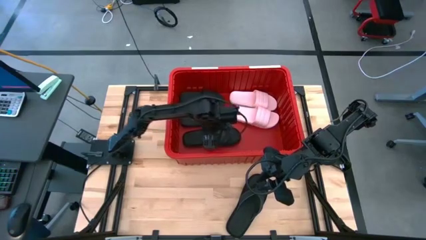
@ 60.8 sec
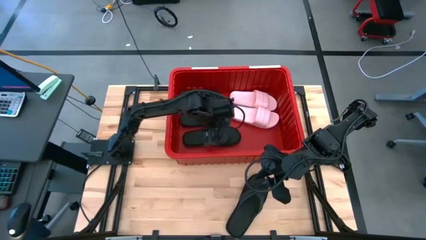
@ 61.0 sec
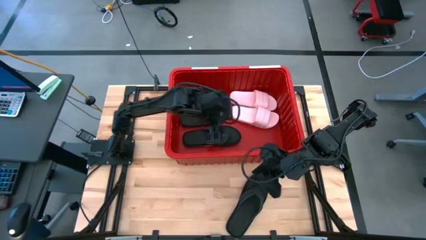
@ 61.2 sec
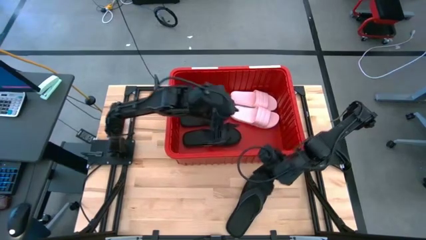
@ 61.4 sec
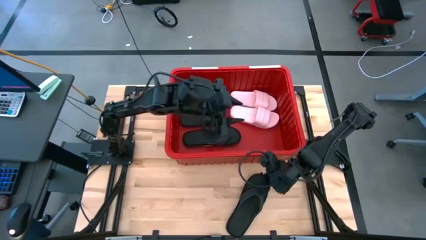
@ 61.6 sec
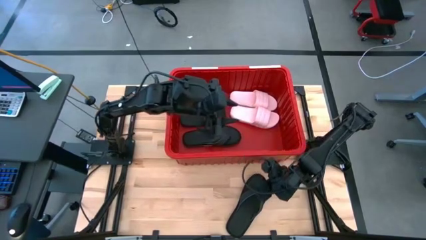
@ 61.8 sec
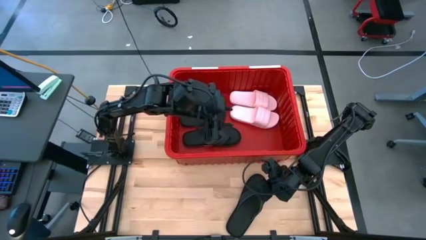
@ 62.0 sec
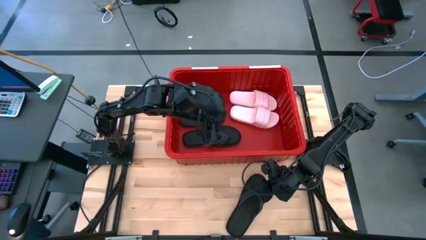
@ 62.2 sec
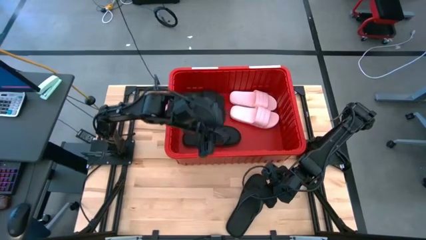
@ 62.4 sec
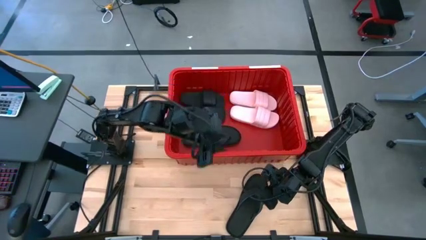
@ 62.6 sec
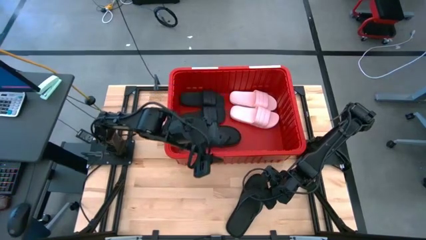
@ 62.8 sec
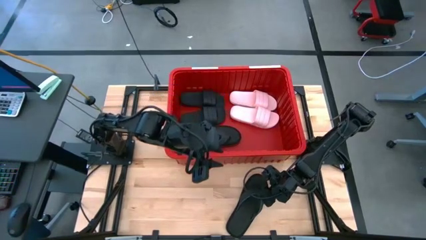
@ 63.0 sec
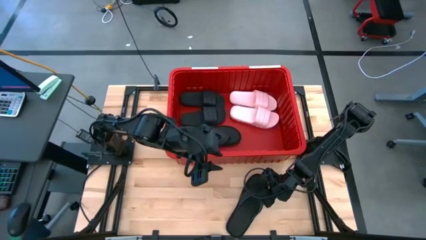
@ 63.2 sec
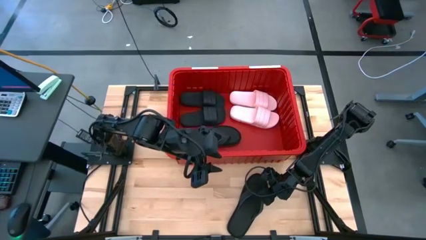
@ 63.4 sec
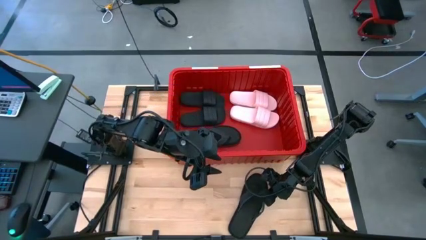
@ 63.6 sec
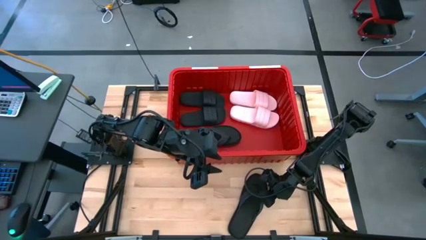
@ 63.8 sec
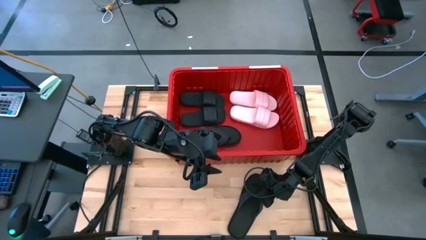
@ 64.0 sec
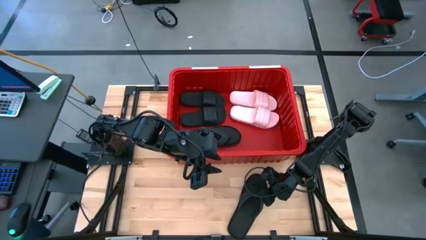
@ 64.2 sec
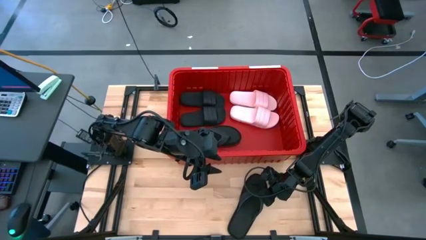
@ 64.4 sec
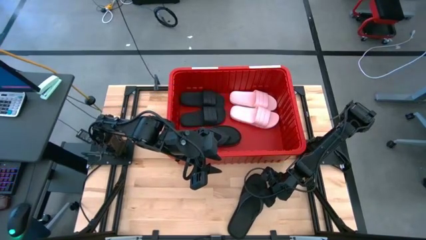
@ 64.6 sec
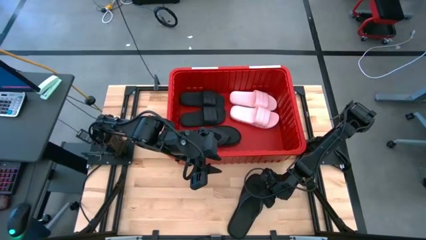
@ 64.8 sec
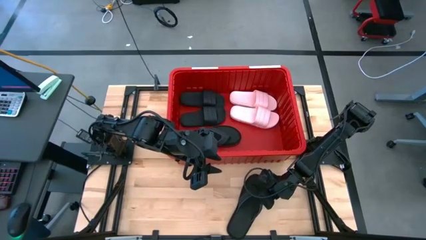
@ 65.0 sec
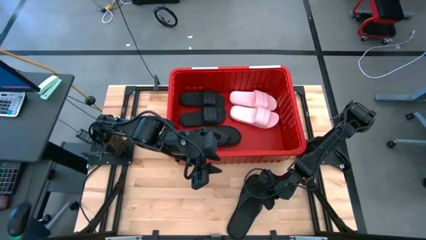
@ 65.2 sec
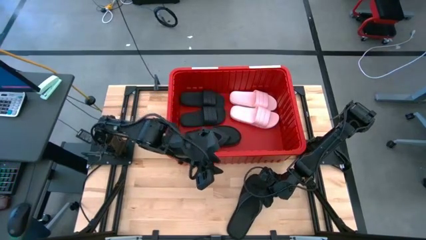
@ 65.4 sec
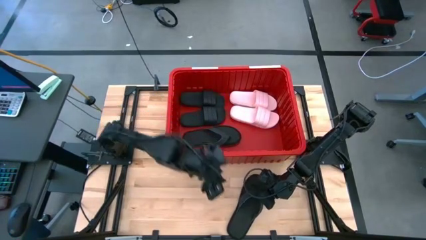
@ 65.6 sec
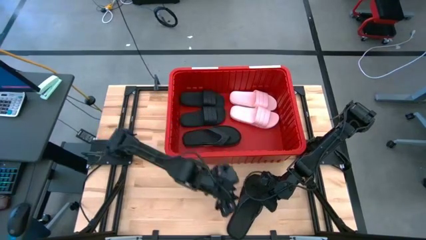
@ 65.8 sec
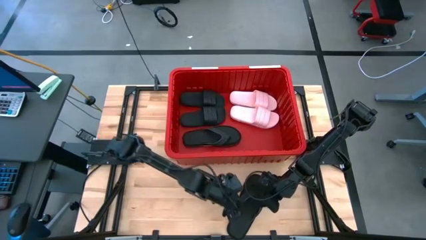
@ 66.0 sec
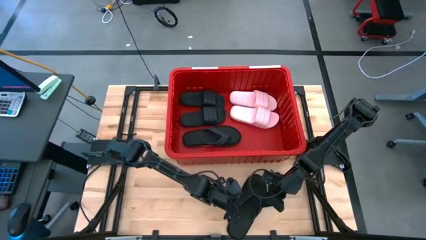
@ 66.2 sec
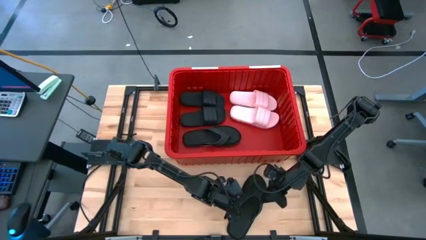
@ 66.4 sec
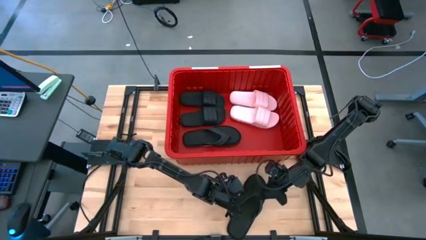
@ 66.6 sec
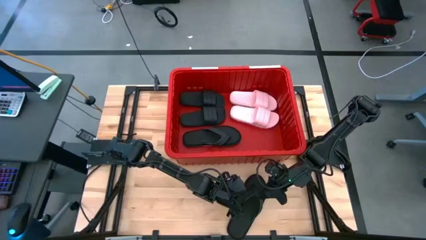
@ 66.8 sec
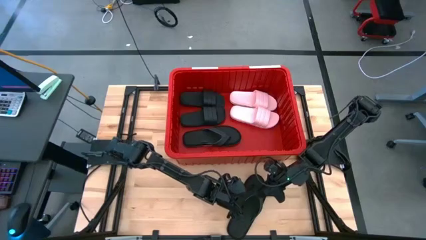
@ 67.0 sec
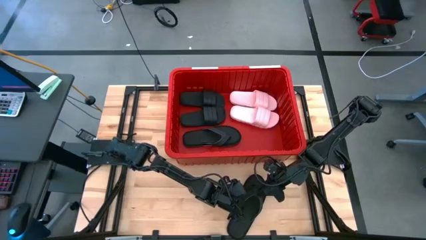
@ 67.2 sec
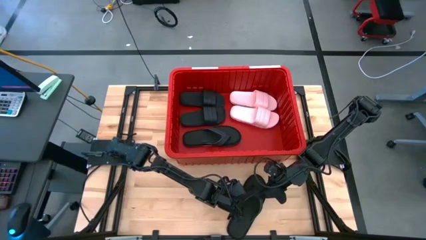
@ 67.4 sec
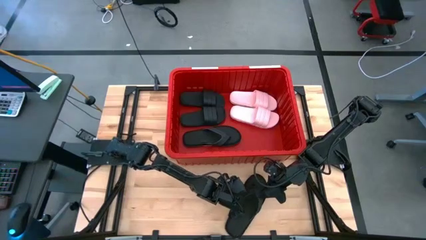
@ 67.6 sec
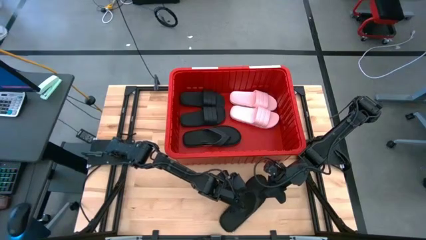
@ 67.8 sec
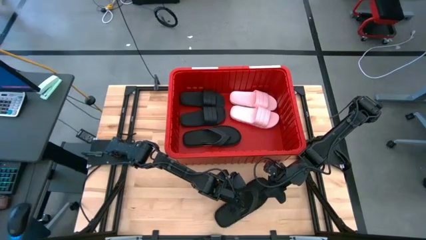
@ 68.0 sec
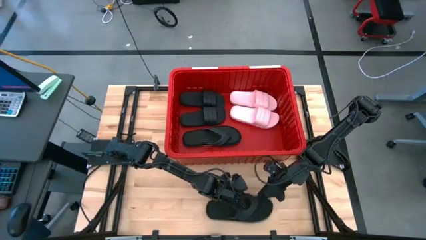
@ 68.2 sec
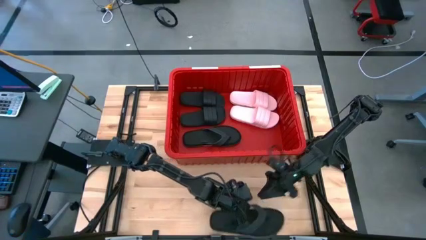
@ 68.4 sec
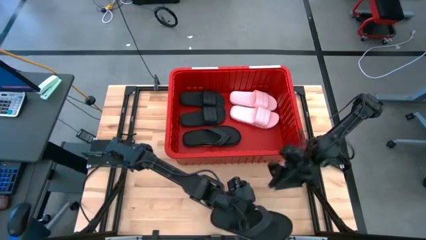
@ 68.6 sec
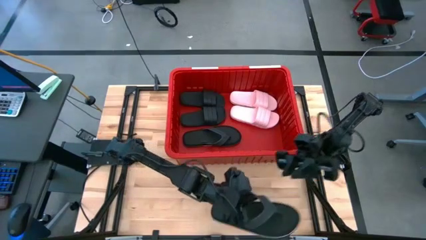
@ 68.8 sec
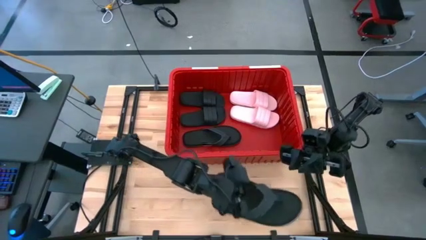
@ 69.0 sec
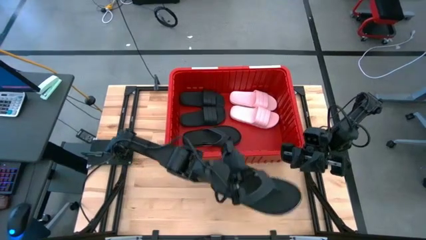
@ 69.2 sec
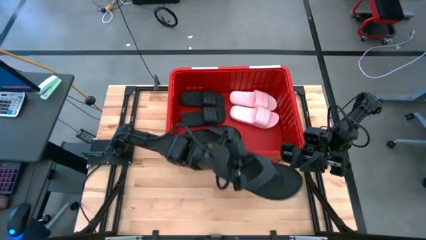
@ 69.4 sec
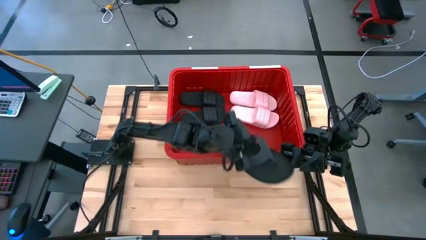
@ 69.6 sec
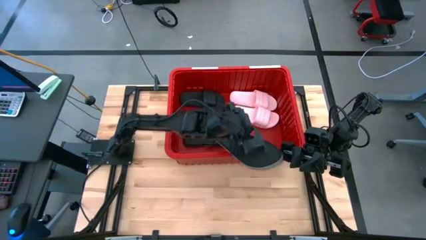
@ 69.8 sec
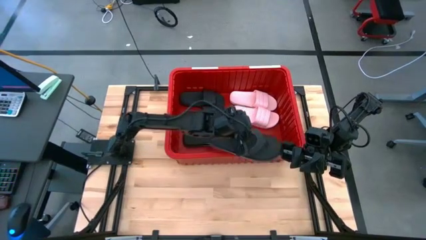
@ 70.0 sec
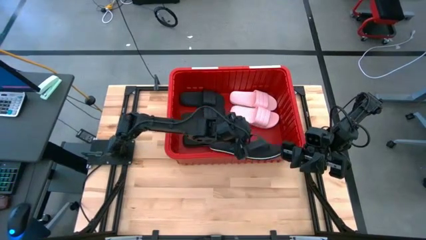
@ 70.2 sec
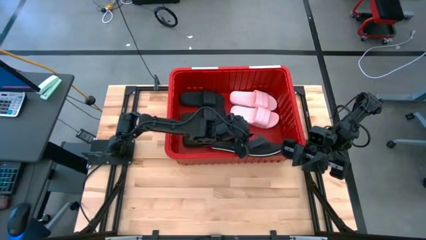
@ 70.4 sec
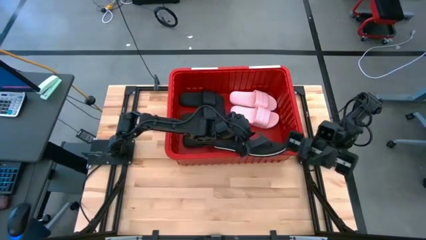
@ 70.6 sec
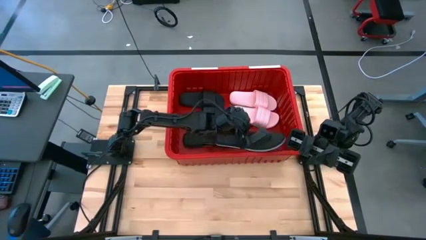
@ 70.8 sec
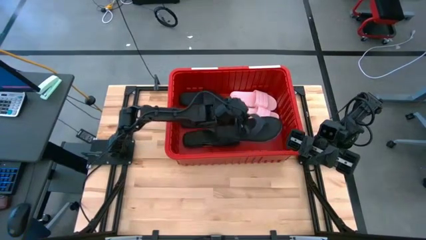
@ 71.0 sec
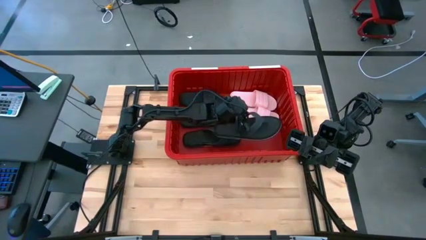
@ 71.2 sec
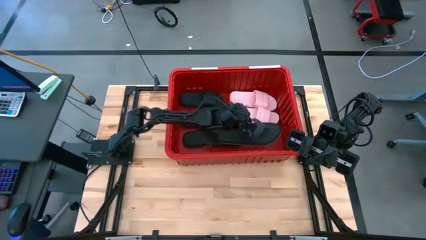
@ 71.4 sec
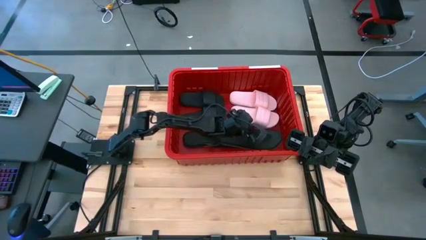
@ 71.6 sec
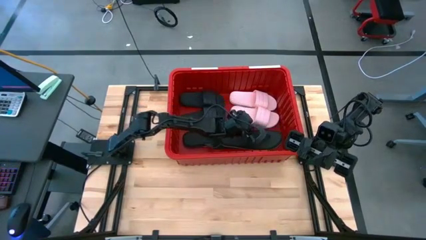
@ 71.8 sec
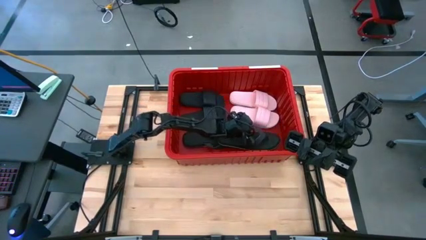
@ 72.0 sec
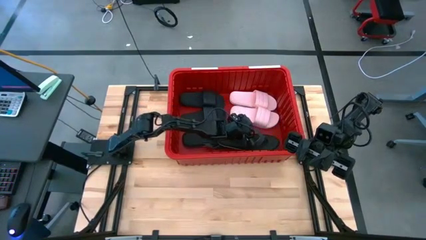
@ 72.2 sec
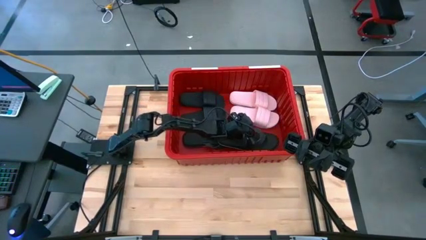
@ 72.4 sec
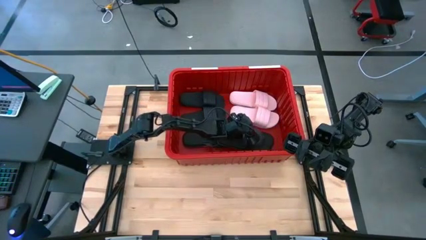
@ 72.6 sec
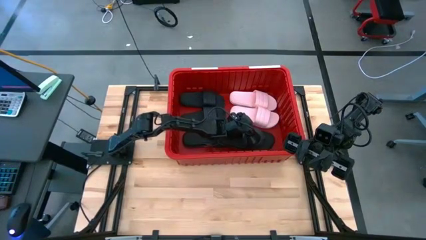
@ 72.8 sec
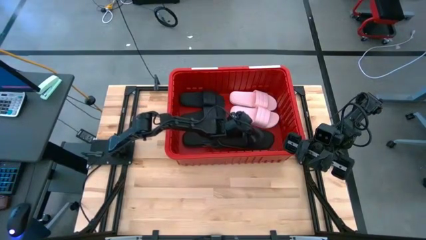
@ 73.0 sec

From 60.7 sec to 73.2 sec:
Task: Pick and place slides into bin
Put the black slipper into the red bin and align it with the other black slipper
